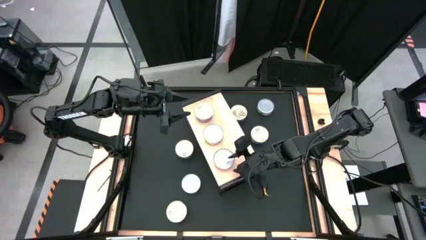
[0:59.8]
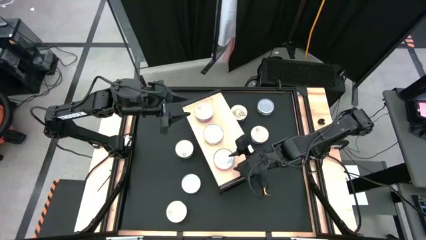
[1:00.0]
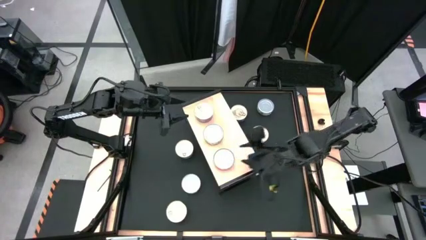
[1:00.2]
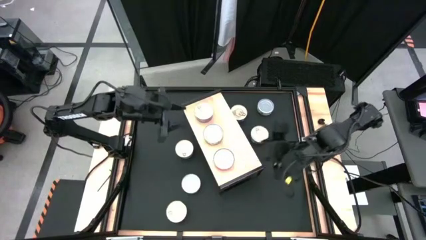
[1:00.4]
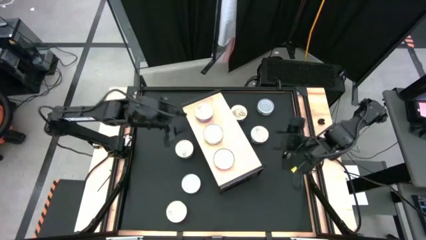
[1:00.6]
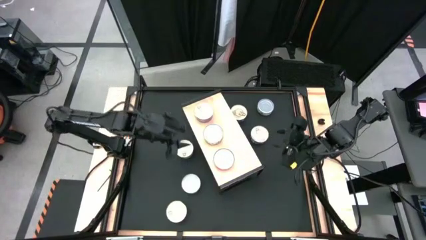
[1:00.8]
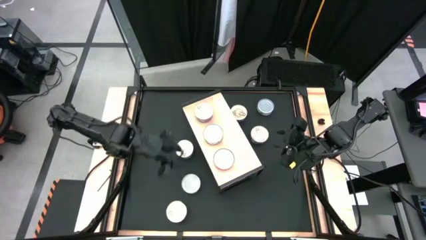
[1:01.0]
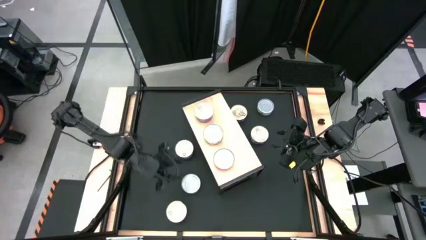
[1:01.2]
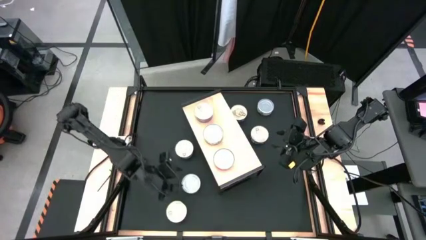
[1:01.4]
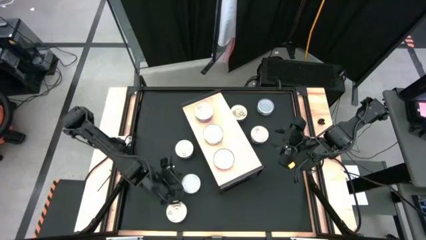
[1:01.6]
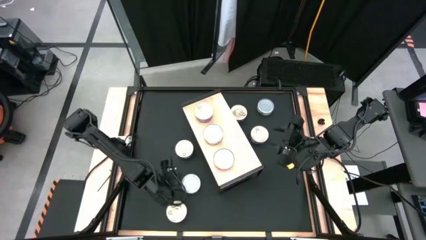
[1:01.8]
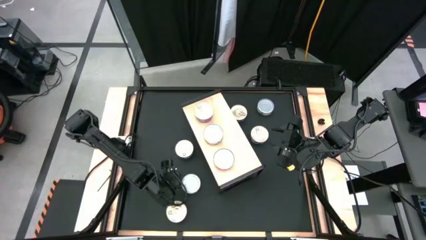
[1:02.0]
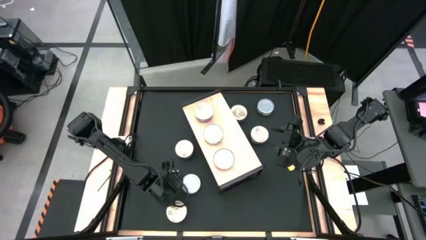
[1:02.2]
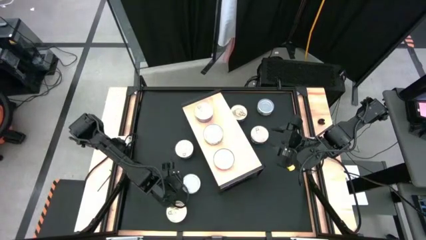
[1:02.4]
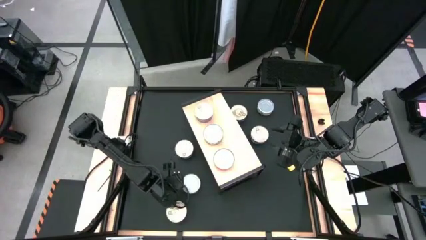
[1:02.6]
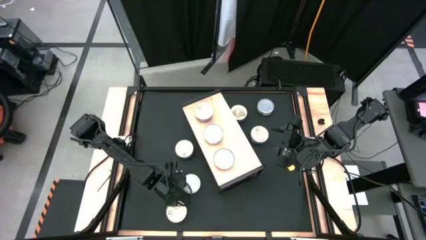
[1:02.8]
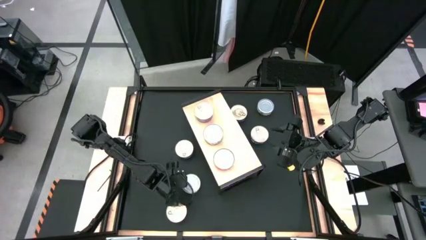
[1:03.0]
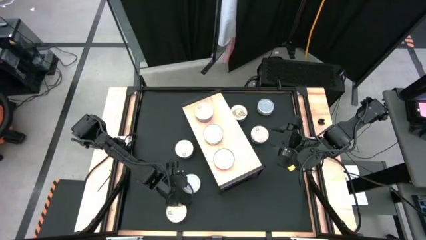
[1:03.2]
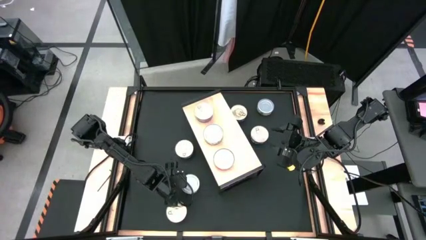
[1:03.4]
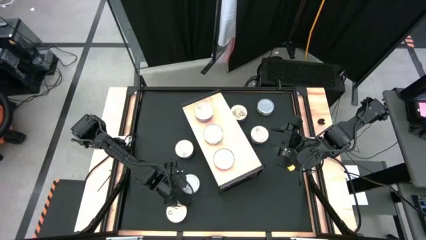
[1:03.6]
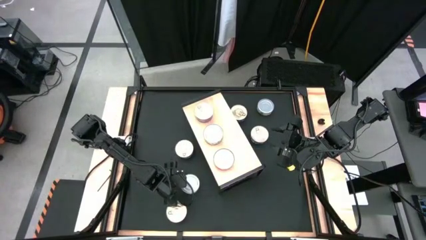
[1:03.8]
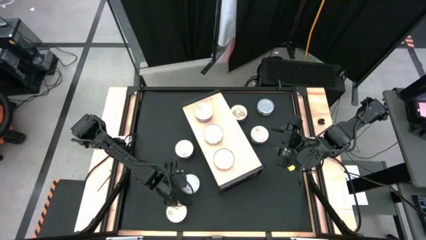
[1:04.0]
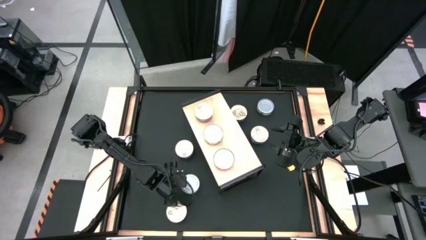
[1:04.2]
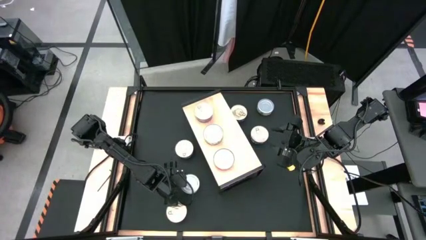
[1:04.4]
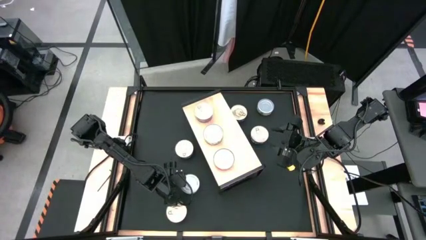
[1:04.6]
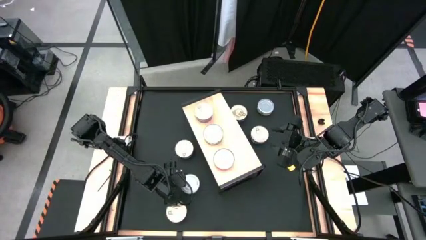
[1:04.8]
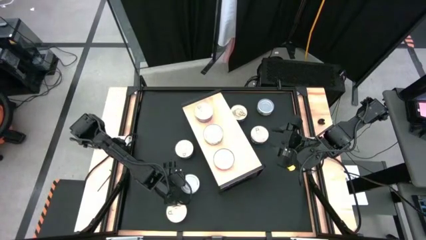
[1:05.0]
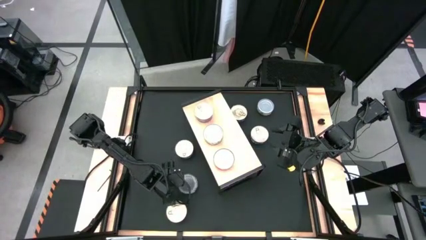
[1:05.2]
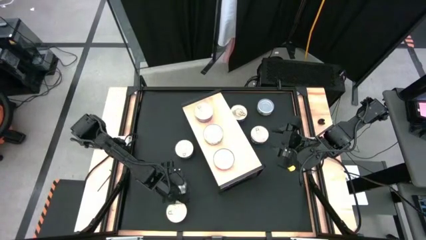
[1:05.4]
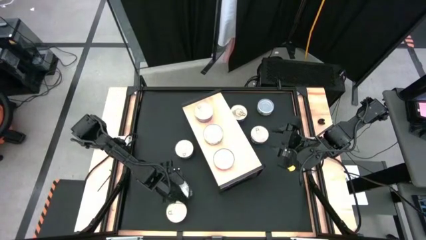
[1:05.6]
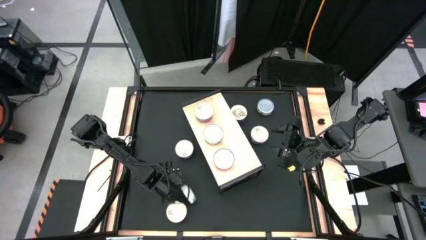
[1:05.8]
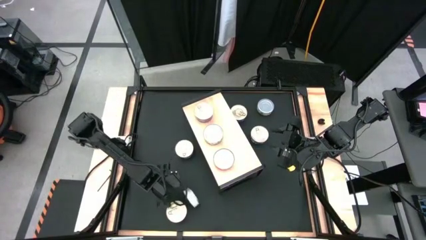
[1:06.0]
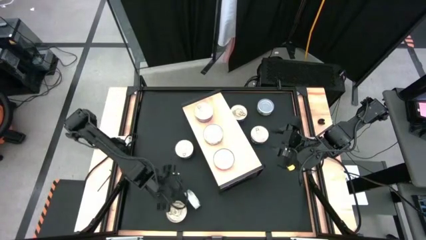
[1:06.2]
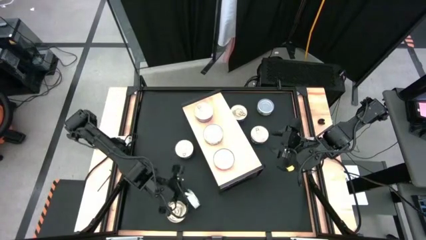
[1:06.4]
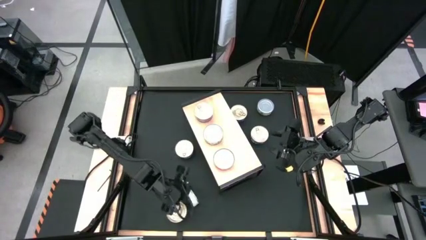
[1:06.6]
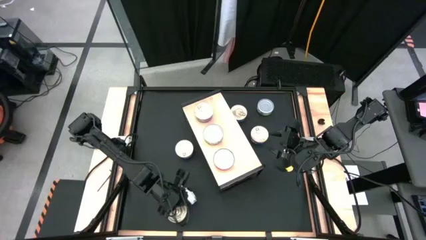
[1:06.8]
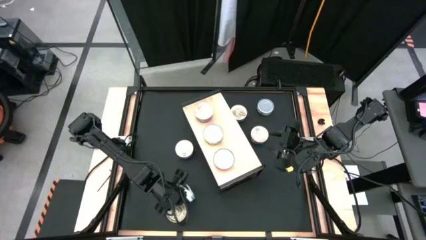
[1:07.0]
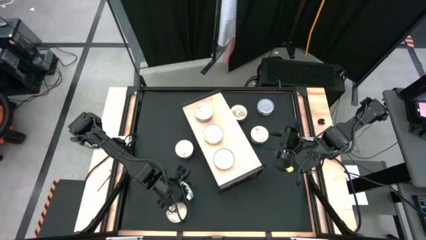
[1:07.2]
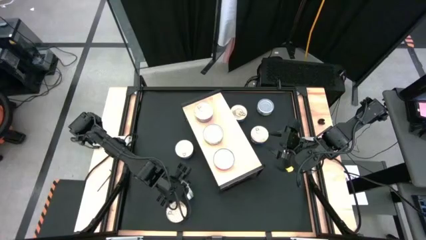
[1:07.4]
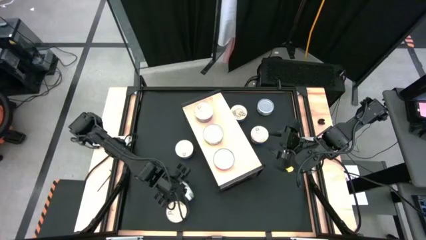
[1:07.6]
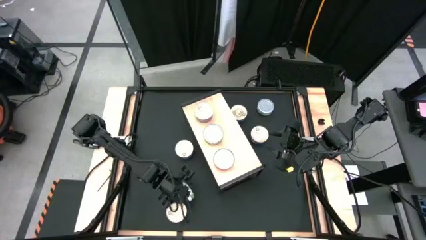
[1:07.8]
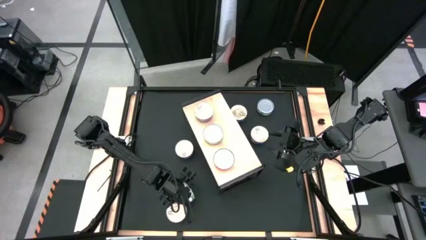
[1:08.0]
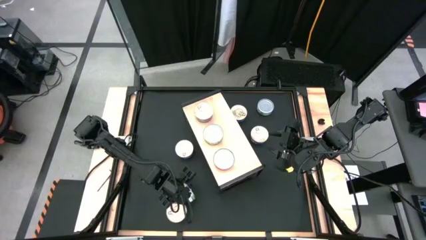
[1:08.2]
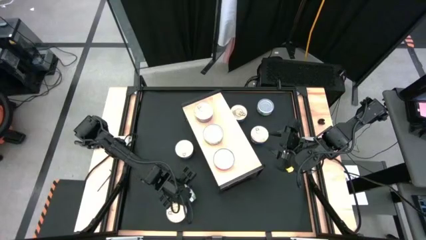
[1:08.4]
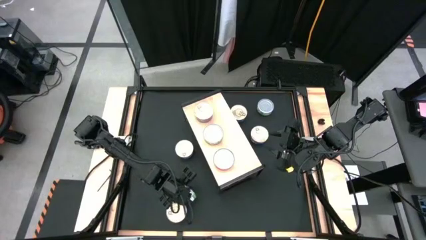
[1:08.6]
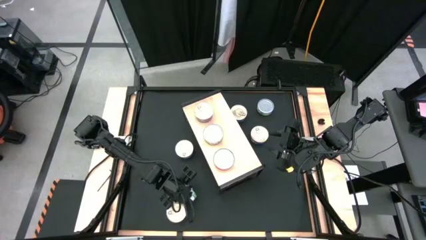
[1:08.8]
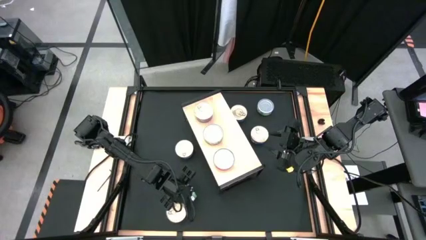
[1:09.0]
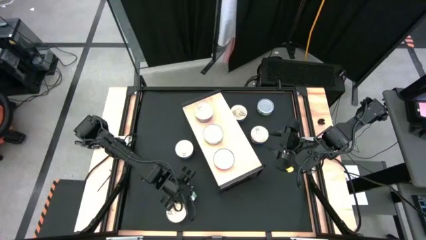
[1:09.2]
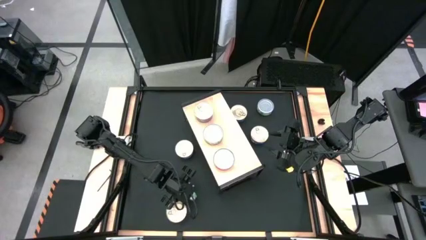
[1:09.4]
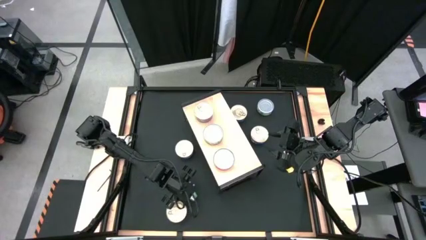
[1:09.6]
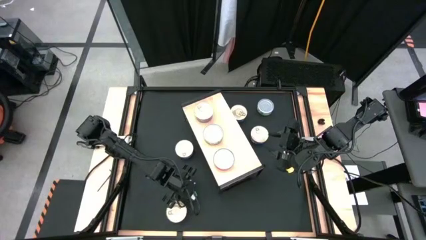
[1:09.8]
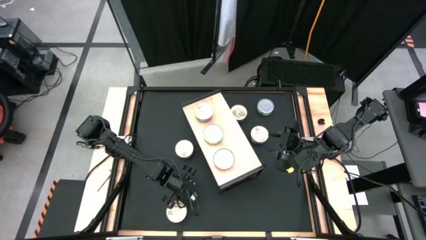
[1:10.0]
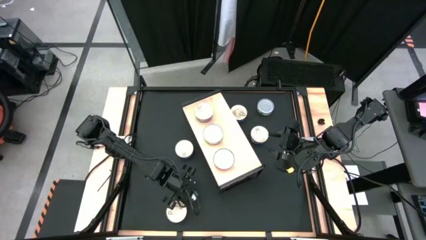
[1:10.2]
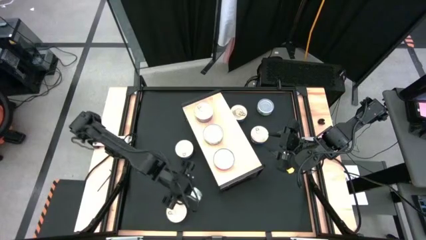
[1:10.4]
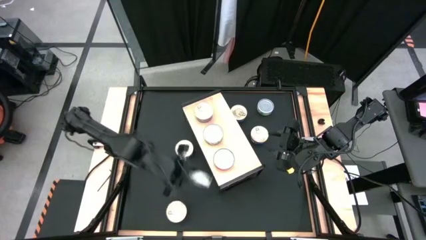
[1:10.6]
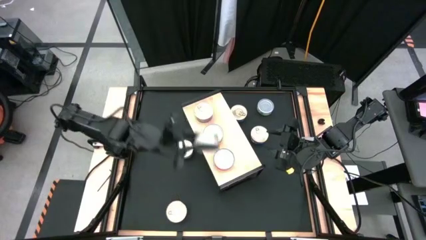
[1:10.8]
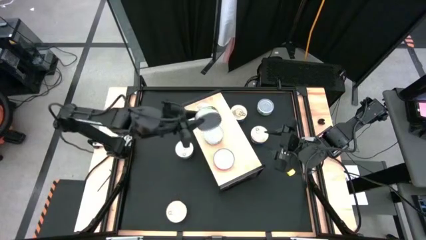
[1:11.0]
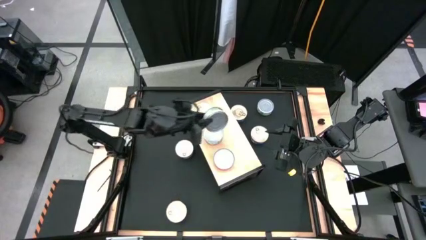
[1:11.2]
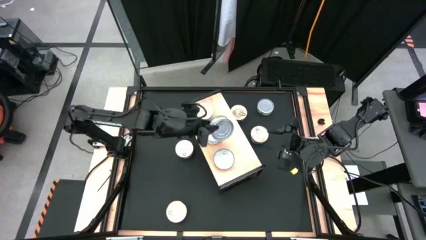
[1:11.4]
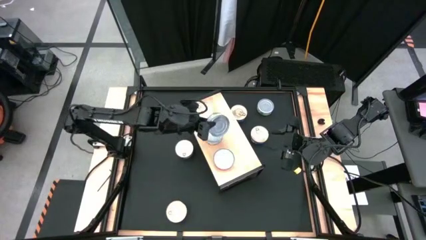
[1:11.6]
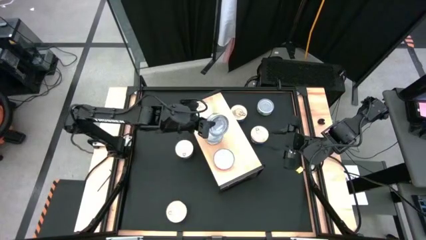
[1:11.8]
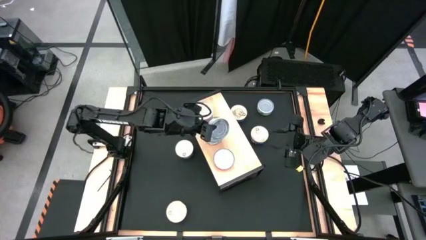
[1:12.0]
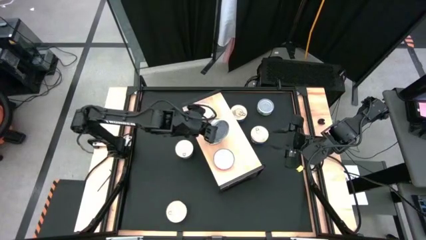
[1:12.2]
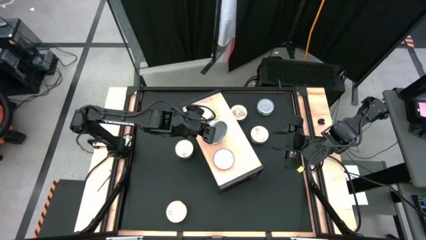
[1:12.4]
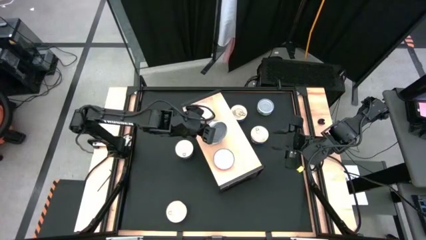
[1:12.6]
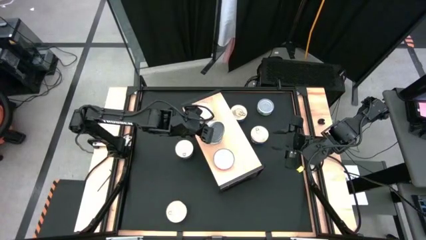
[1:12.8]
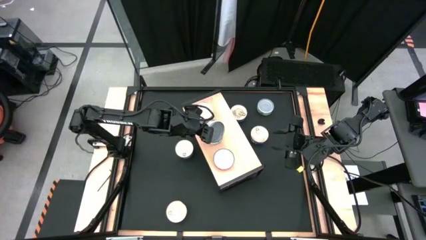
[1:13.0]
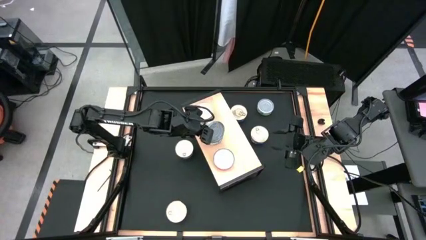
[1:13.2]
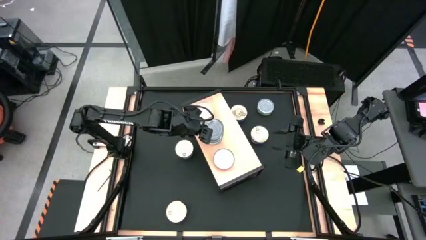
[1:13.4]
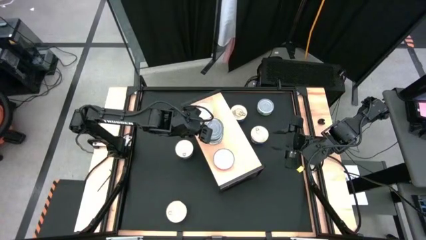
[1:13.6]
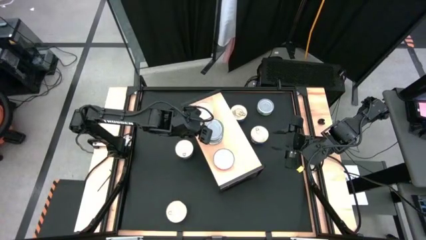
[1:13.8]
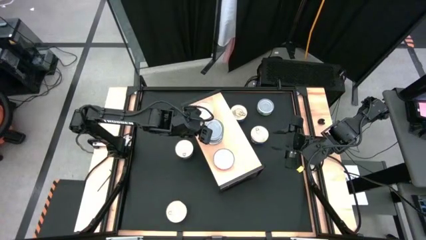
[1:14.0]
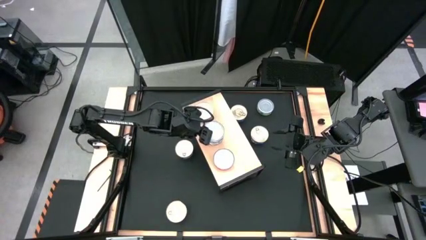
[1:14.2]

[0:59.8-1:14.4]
Task: Stack canned seafood by type on shelf
Stack the green tuna can on top of the green tuna can on the shelf

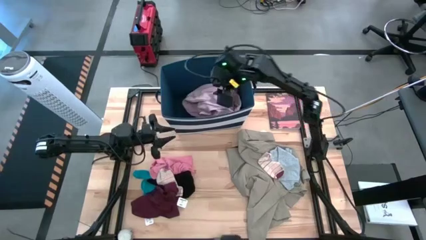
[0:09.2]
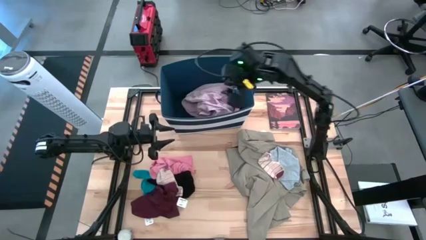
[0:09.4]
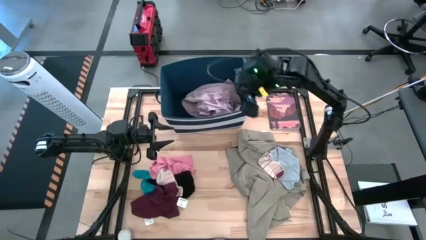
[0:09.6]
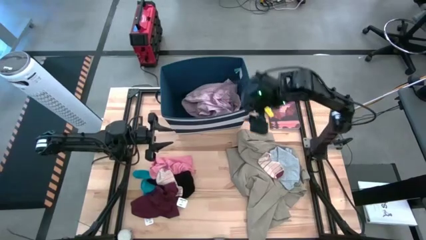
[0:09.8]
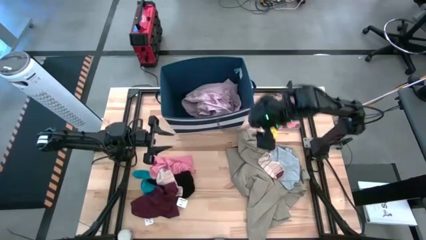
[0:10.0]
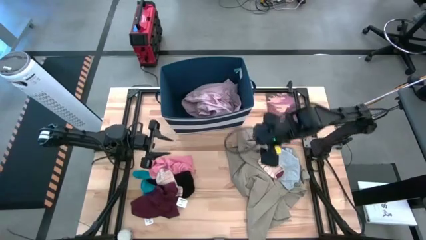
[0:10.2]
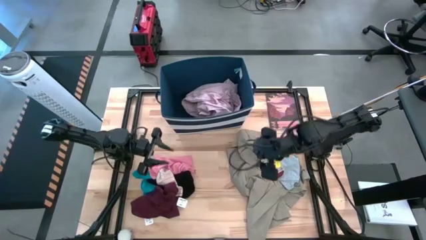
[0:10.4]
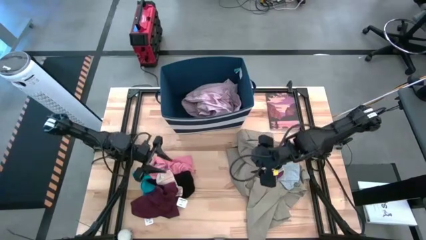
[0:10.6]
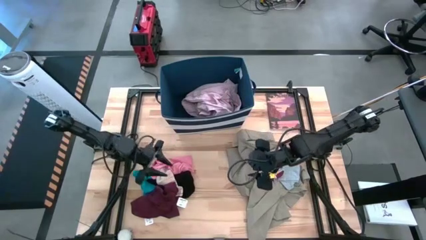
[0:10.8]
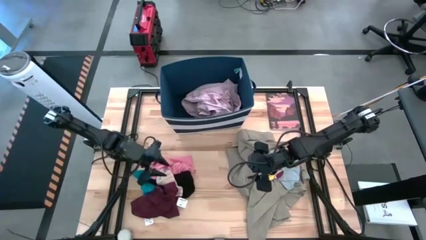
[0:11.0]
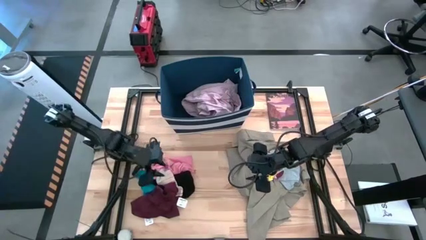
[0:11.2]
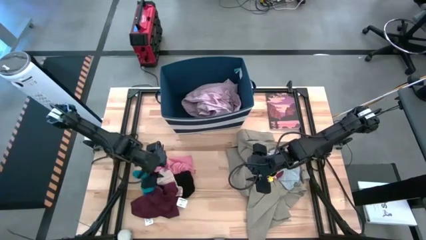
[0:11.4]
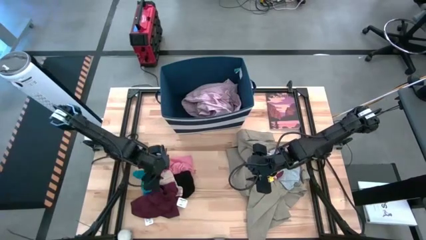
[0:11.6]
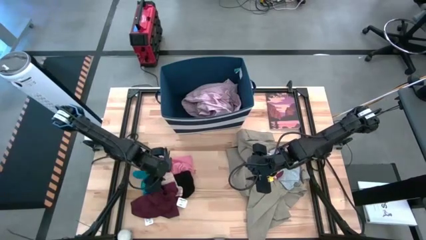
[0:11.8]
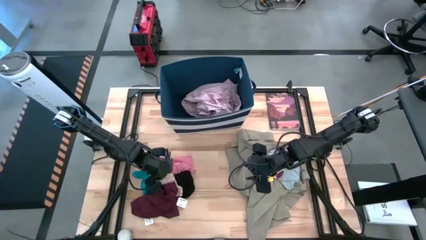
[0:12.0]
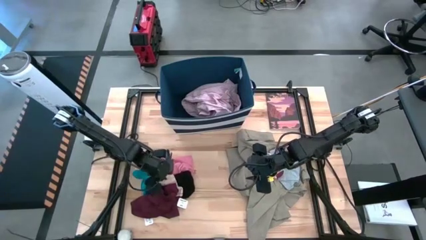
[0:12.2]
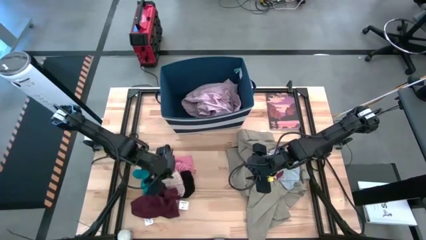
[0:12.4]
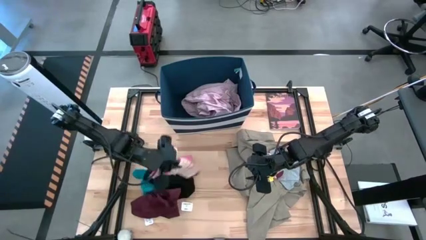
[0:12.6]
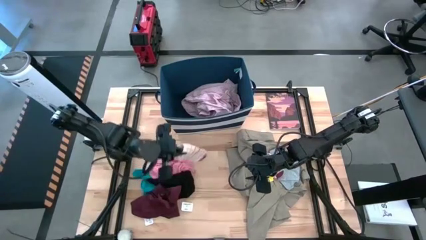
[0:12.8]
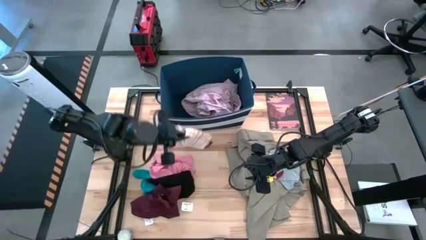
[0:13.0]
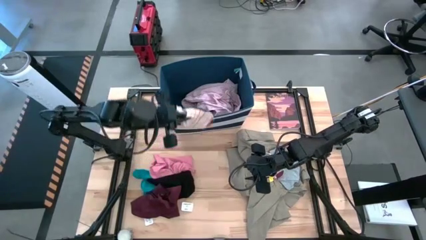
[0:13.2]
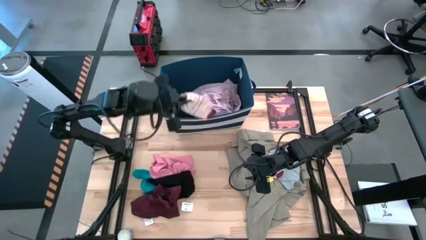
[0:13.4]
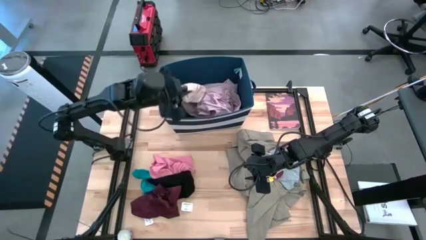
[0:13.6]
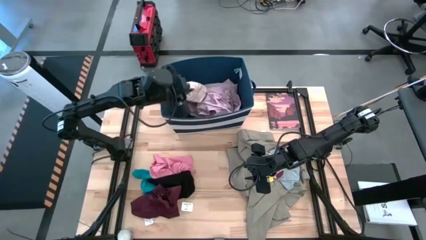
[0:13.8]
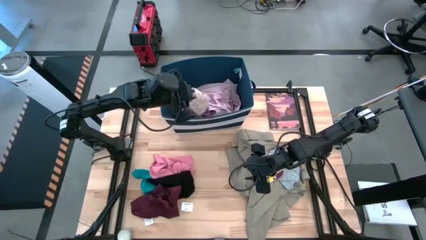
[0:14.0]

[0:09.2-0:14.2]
Task: Sort clothes
Put the pink sock into the blue laundry bin
